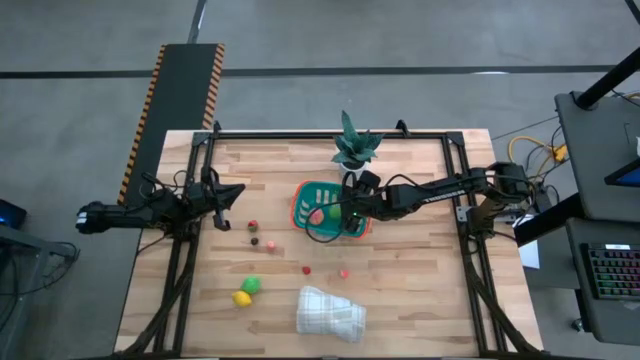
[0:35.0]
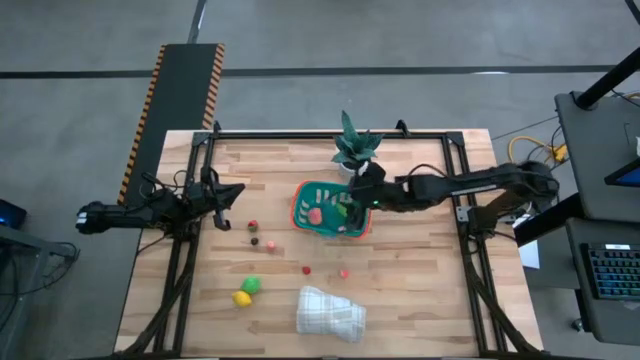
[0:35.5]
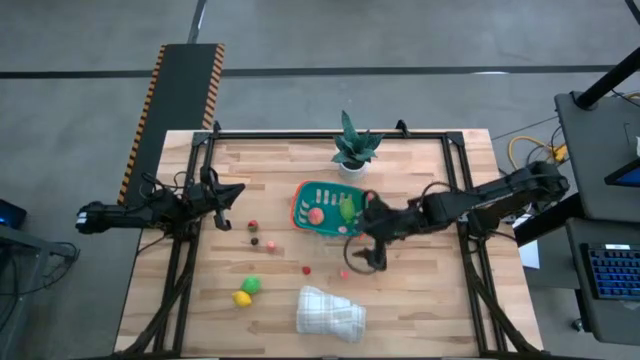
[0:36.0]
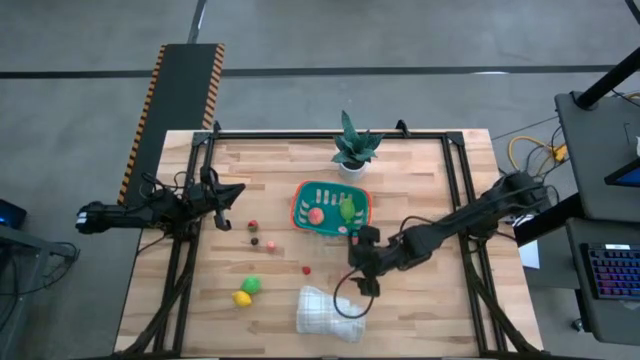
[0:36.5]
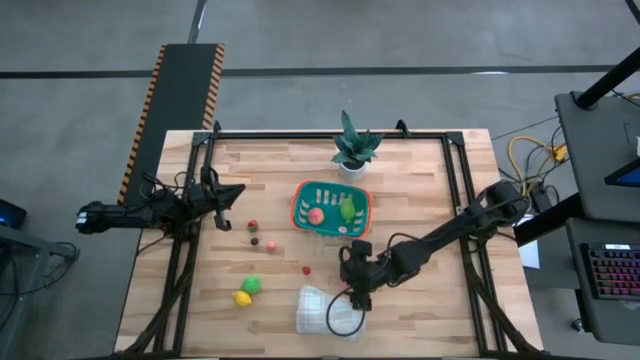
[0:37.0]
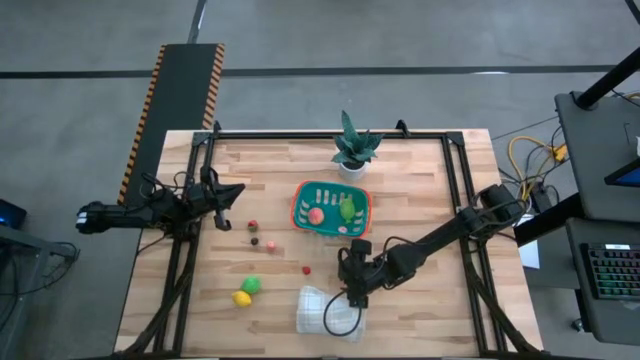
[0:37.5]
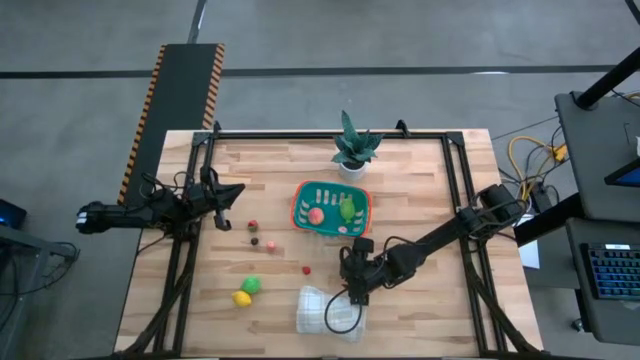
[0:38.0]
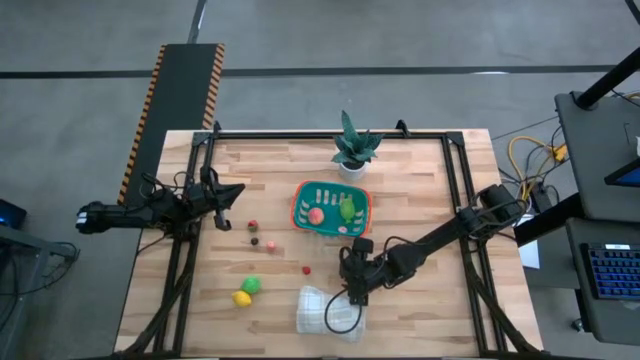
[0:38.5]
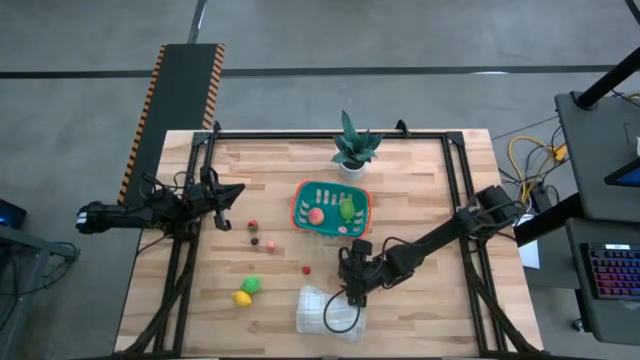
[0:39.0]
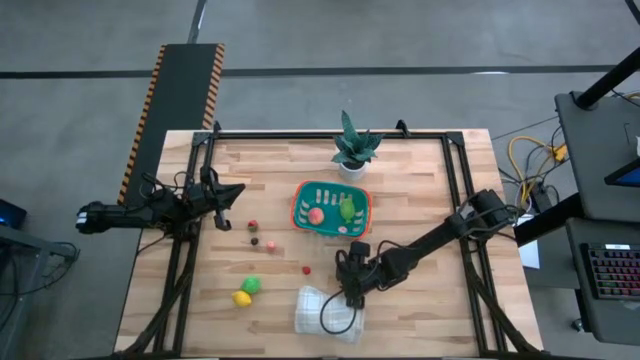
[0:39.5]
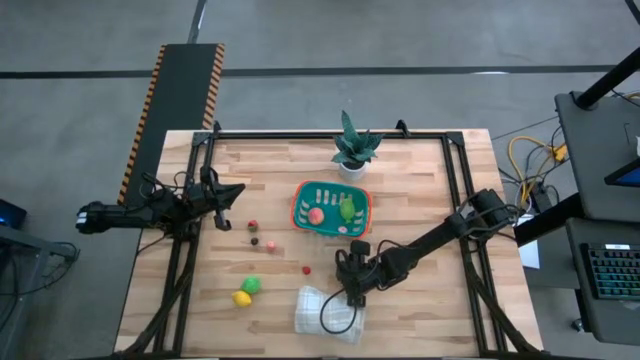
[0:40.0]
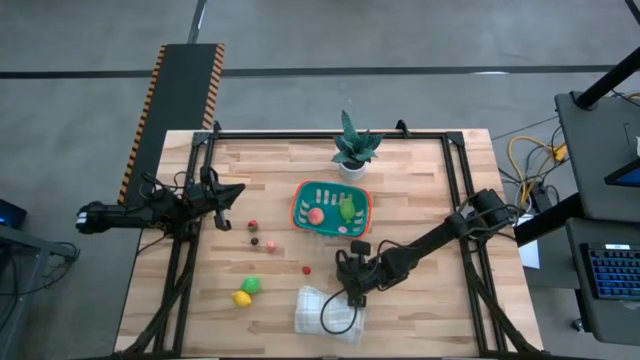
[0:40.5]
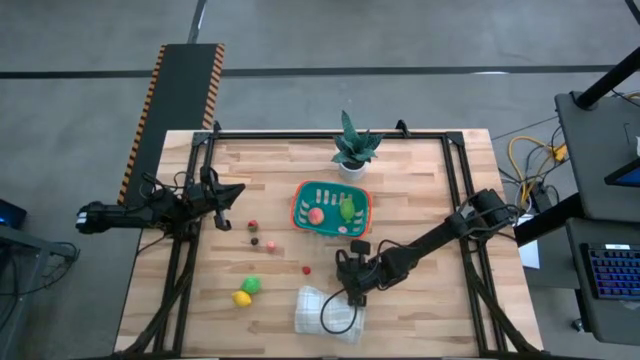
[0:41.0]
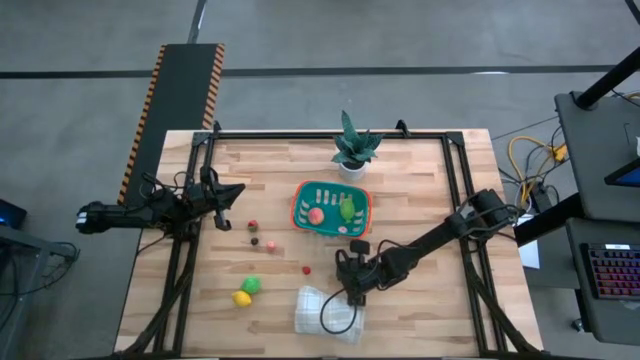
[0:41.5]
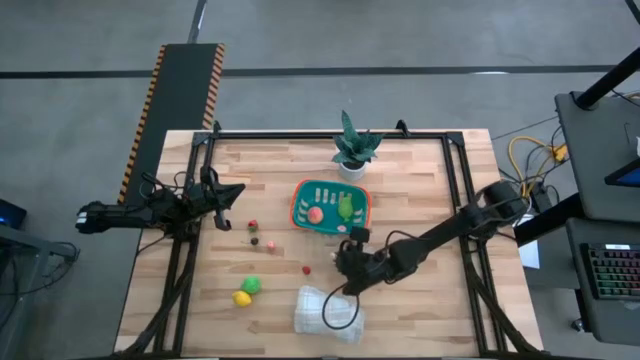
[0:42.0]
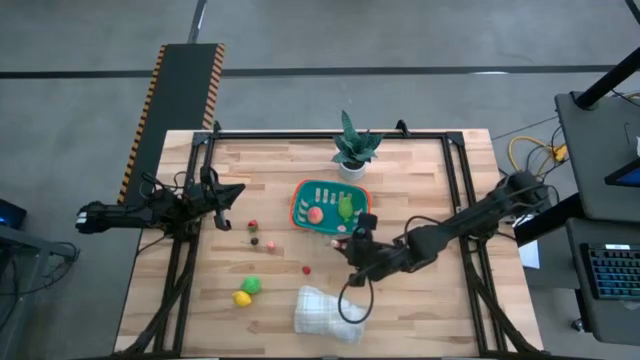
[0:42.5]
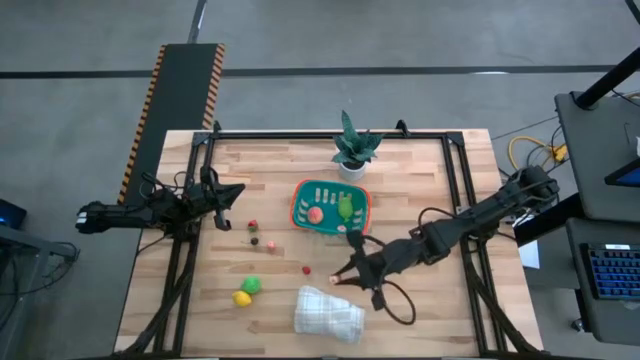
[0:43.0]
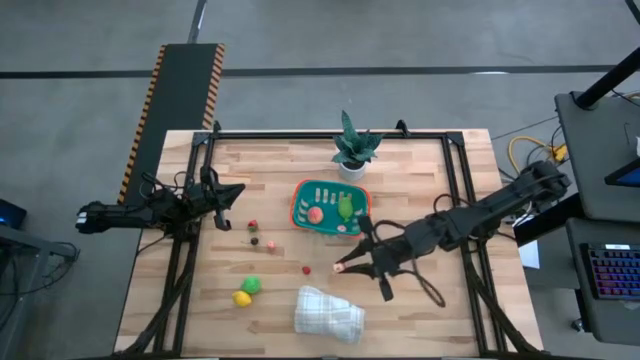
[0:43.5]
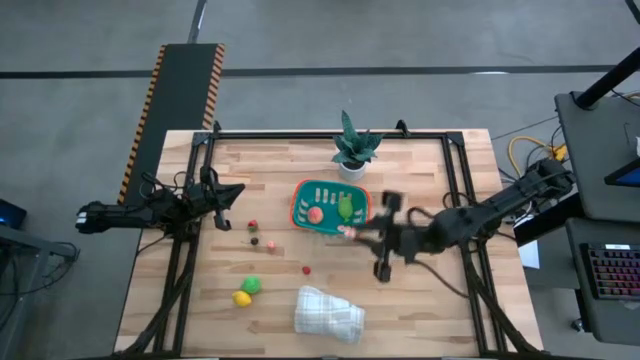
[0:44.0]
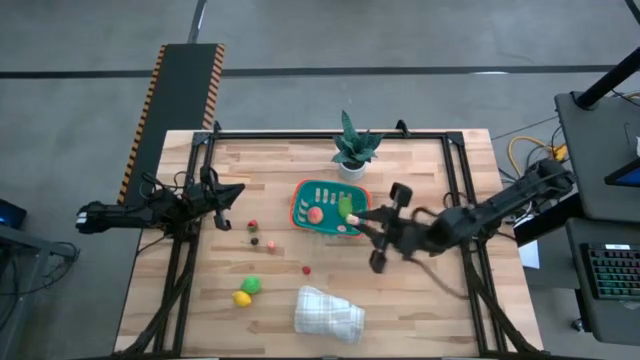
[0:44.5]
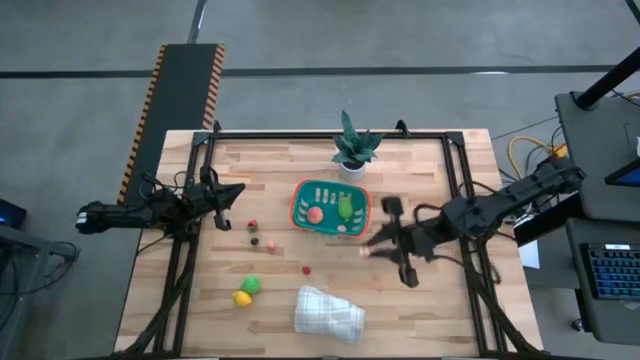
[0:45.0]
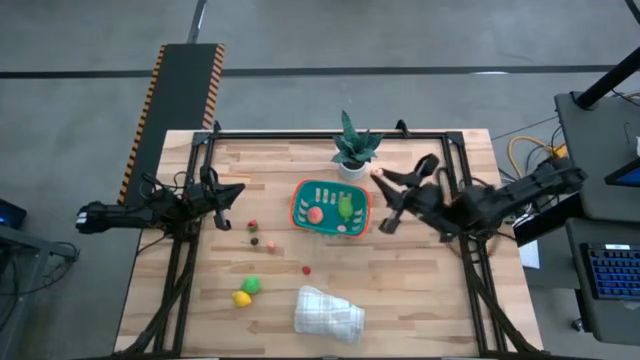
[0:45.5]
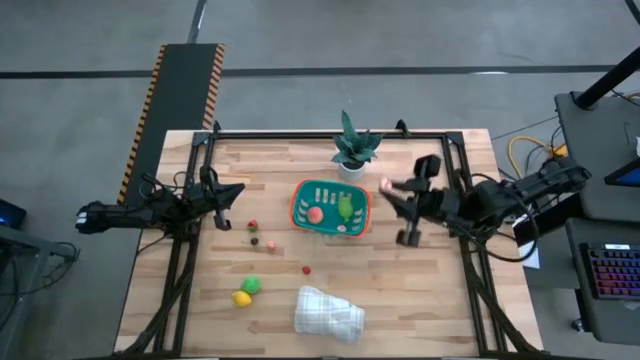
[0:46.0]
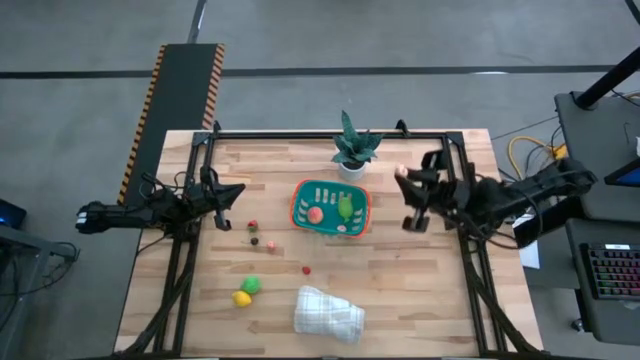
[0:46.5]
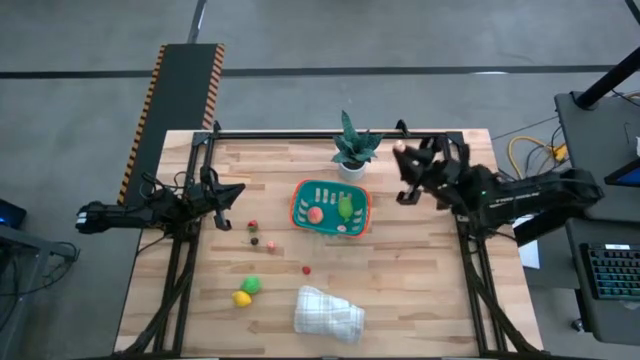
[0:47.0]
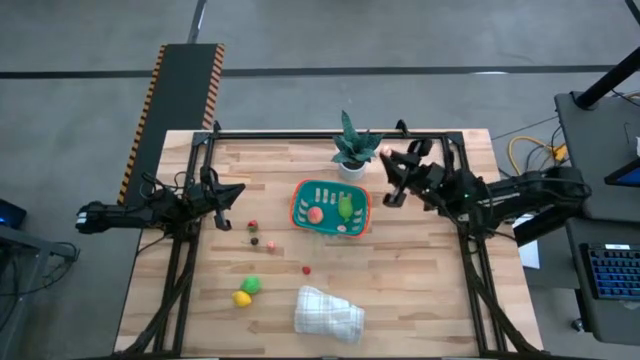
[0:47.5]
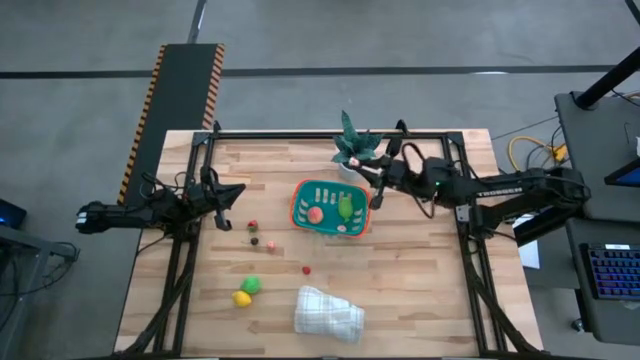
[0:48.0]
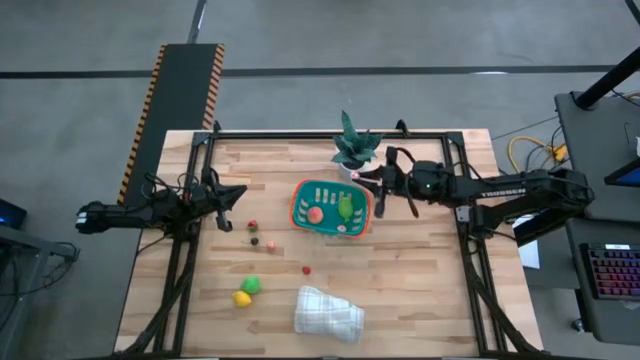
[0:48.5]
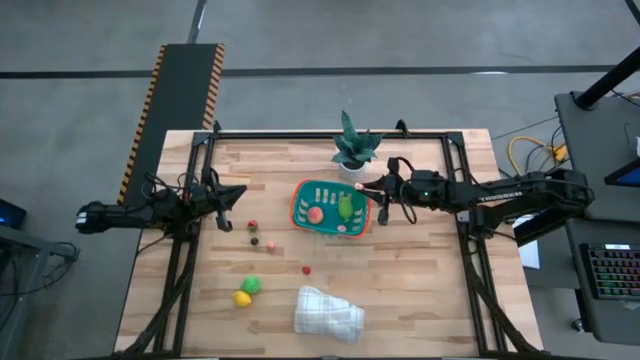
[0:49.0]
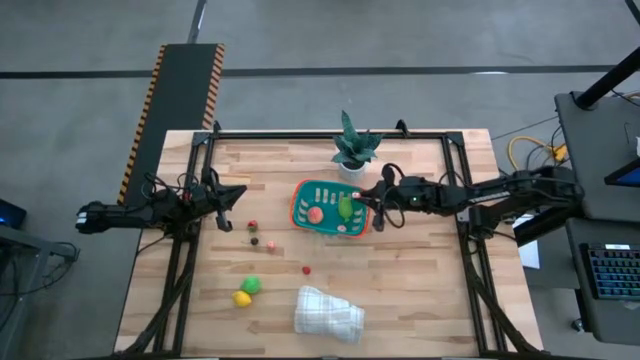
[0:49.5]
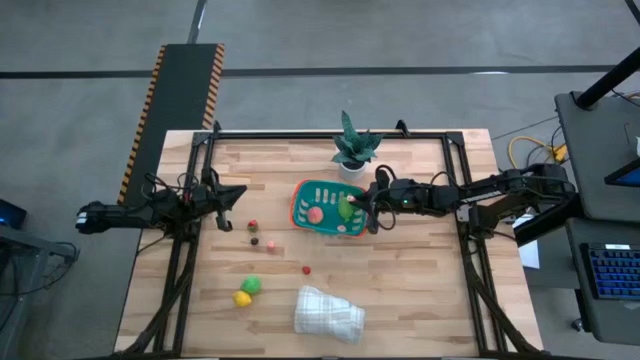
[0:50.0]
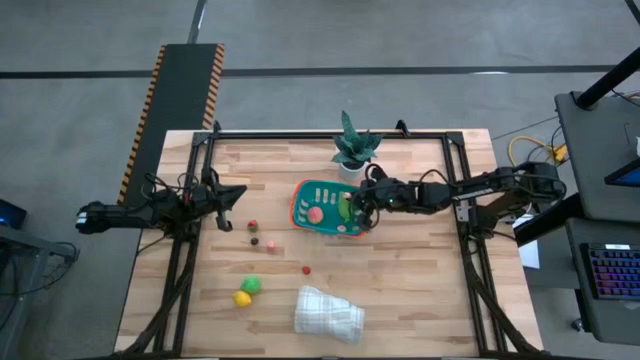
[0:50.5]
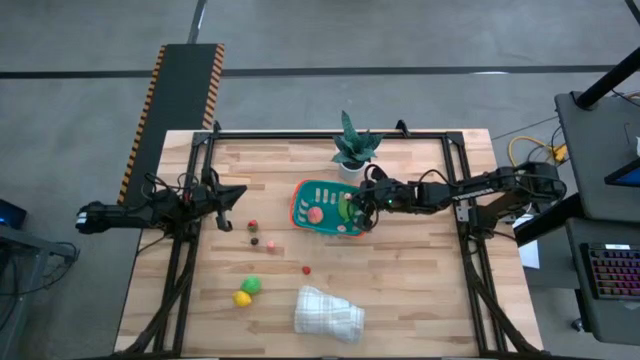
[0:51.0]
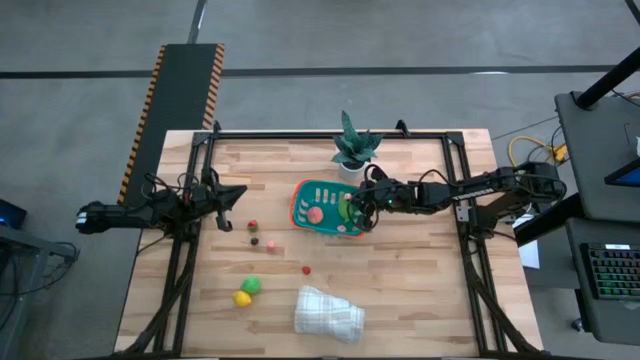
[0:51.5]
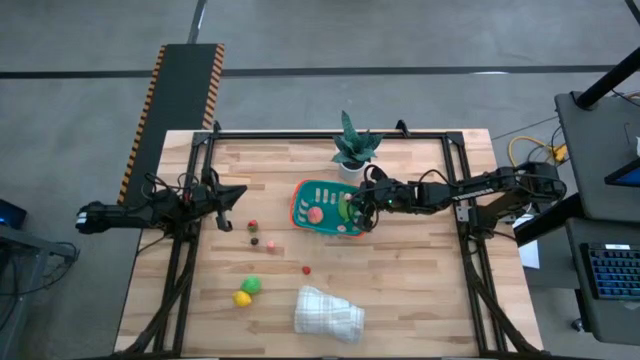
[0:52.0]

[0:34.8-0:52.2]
Task: Build produce basket
Put the pink peach into the blue basket
